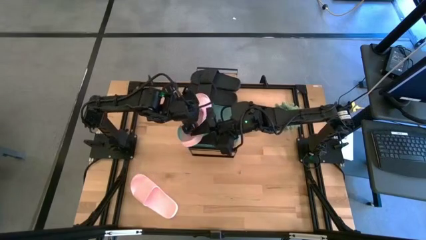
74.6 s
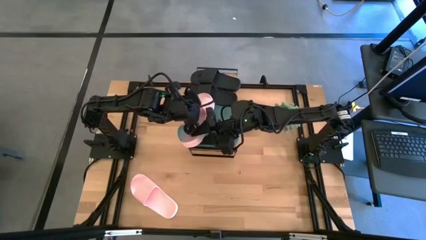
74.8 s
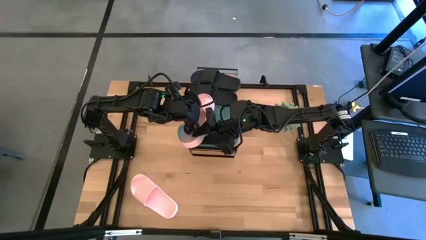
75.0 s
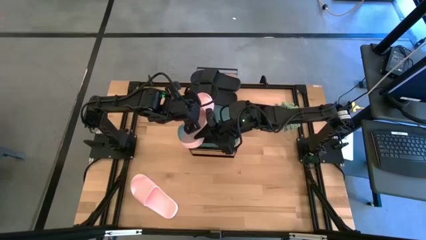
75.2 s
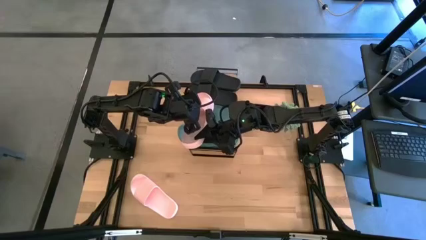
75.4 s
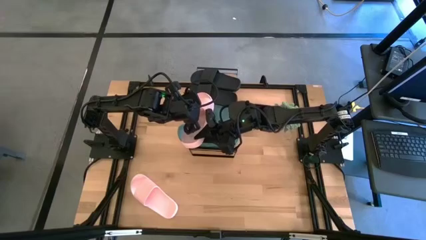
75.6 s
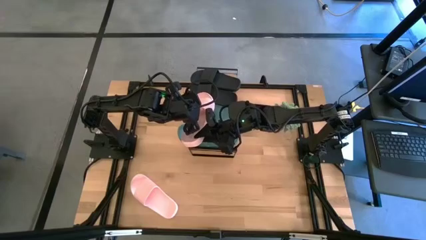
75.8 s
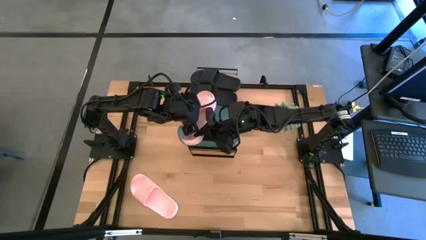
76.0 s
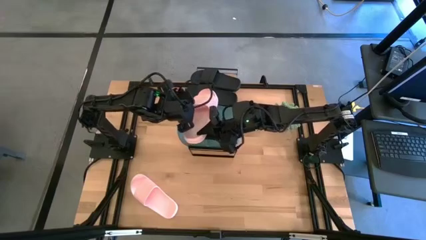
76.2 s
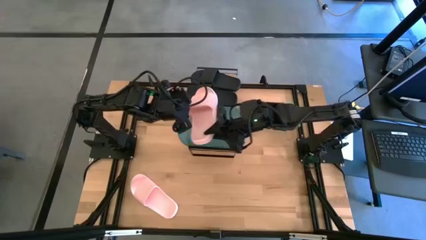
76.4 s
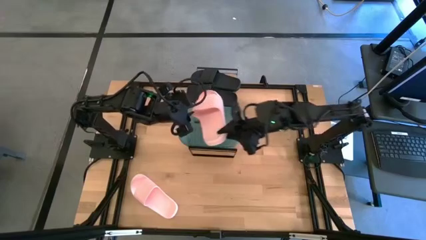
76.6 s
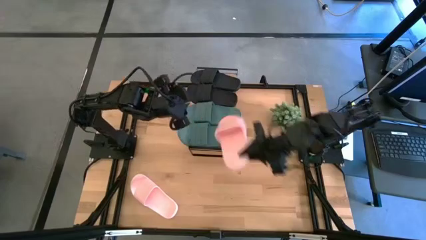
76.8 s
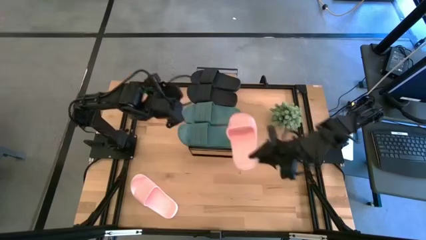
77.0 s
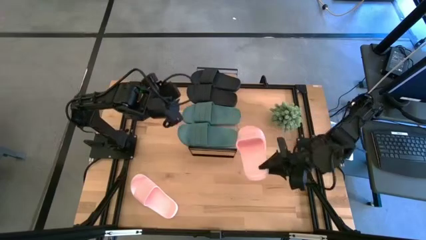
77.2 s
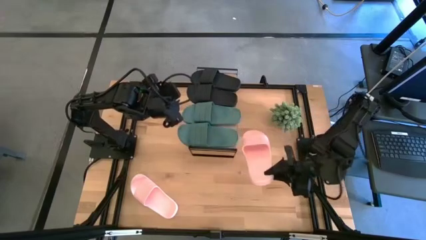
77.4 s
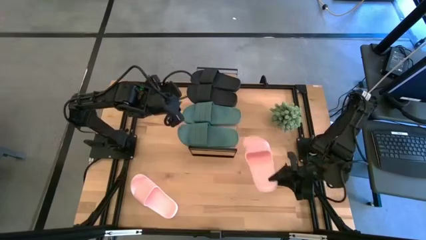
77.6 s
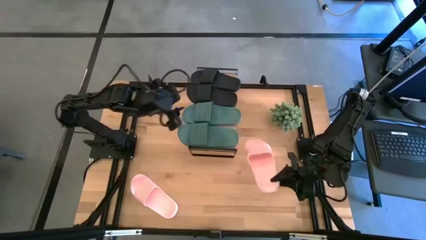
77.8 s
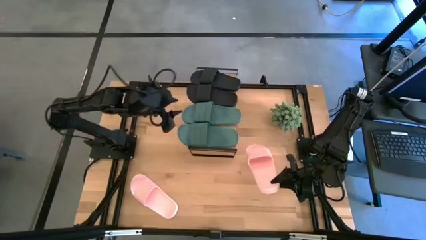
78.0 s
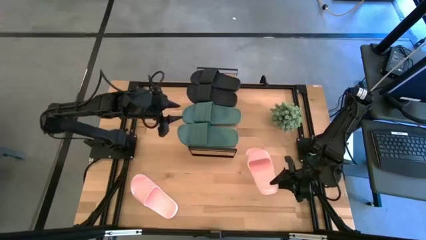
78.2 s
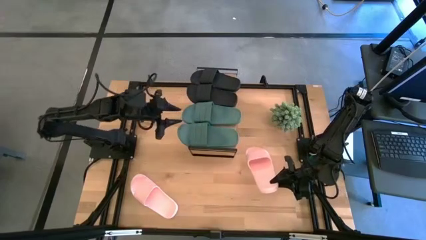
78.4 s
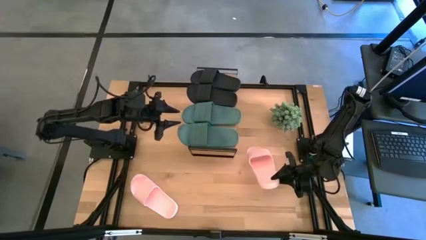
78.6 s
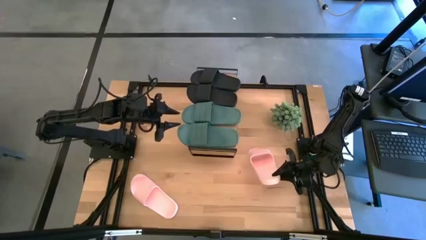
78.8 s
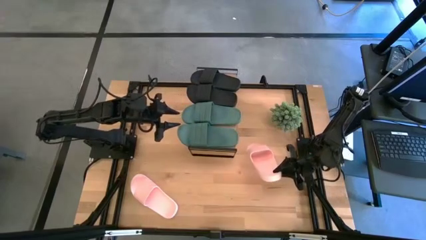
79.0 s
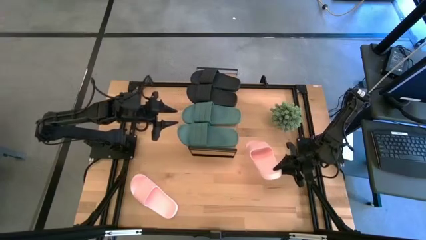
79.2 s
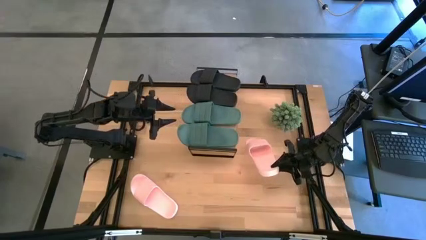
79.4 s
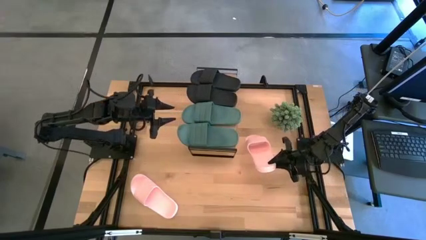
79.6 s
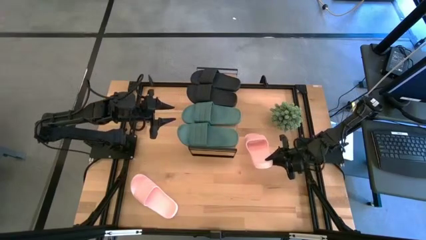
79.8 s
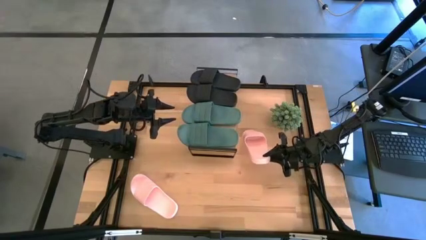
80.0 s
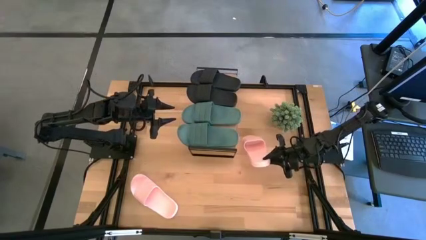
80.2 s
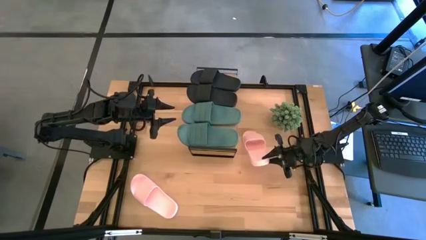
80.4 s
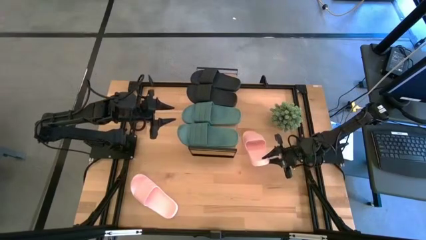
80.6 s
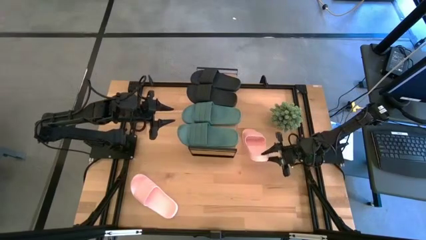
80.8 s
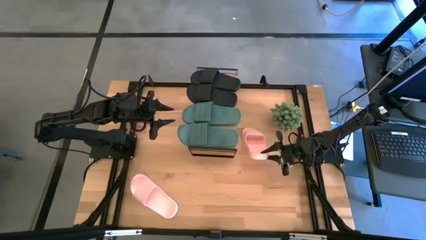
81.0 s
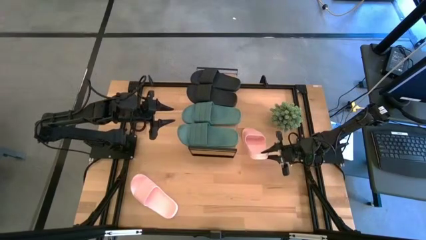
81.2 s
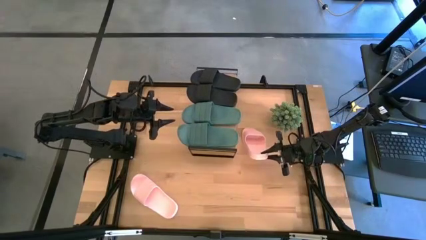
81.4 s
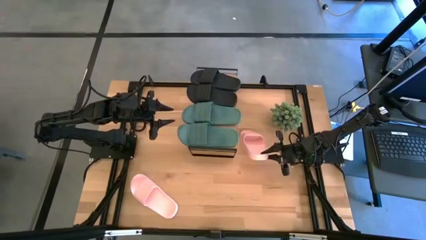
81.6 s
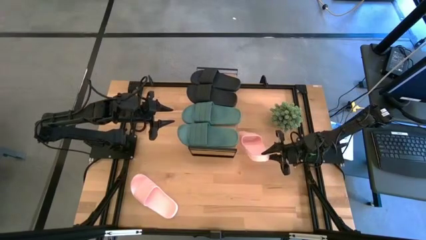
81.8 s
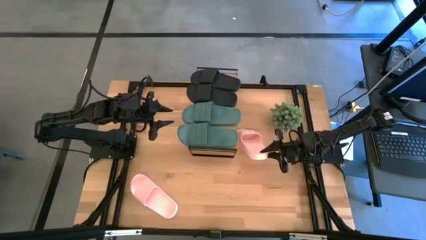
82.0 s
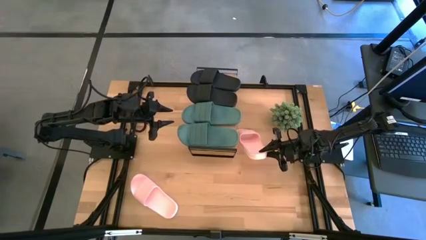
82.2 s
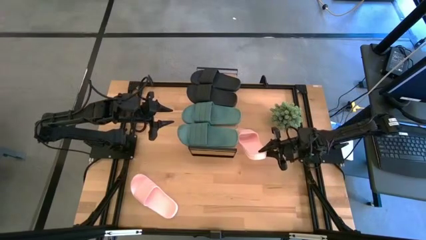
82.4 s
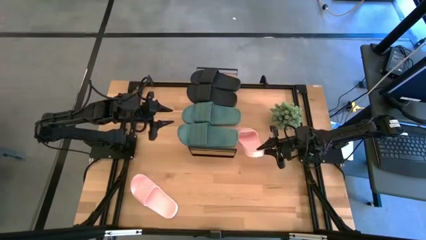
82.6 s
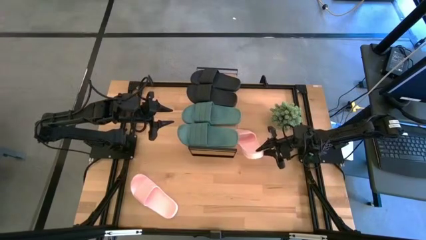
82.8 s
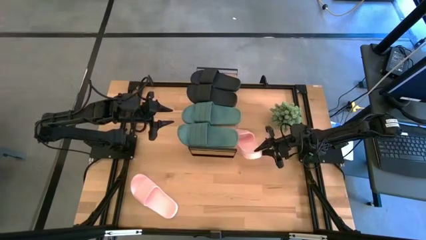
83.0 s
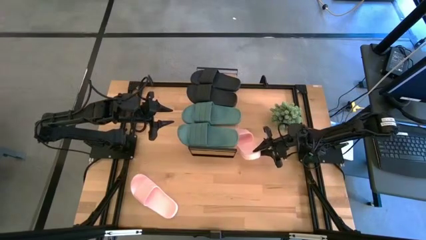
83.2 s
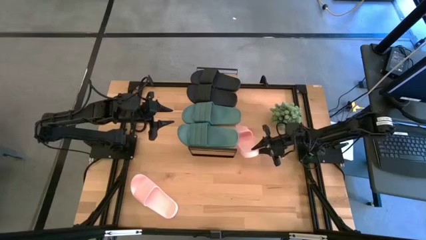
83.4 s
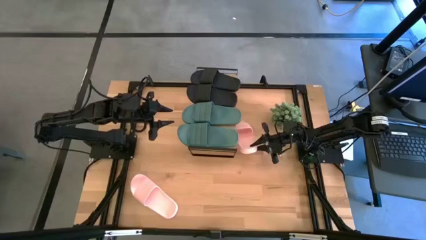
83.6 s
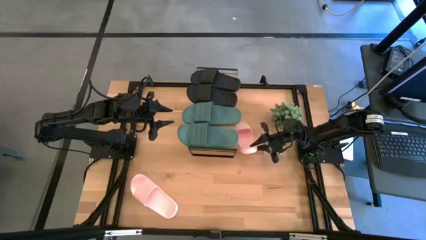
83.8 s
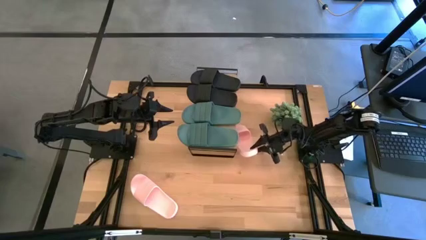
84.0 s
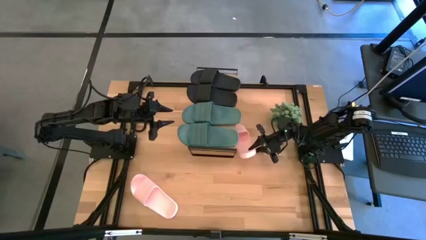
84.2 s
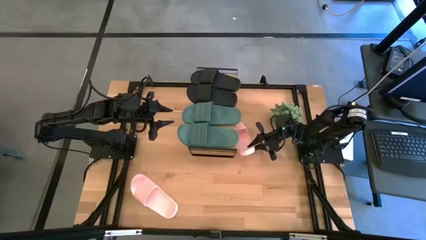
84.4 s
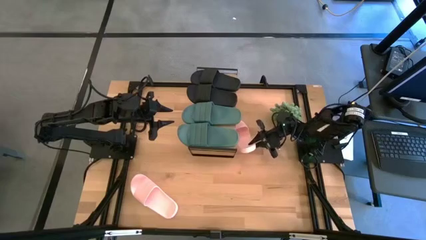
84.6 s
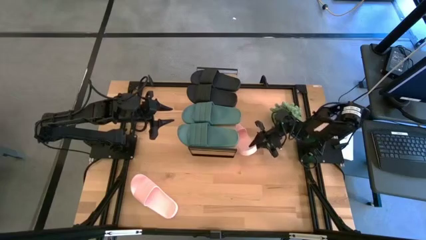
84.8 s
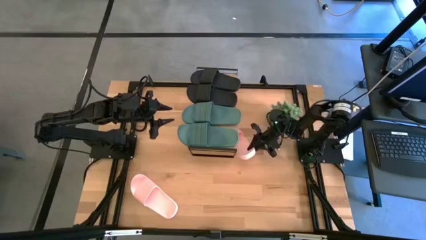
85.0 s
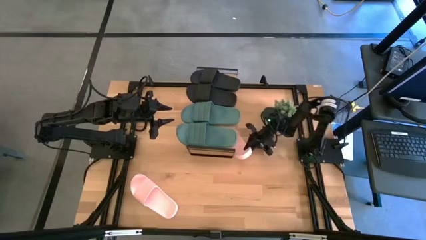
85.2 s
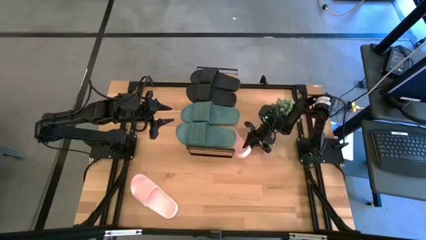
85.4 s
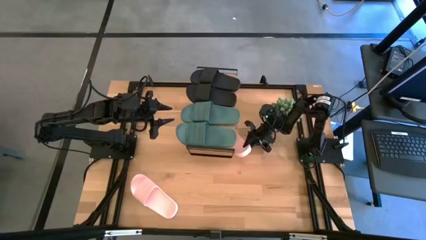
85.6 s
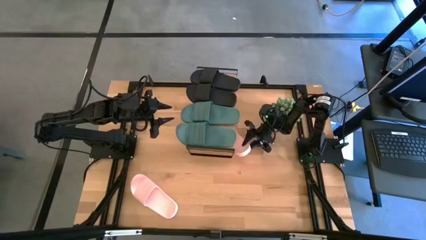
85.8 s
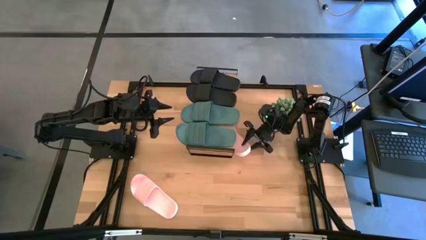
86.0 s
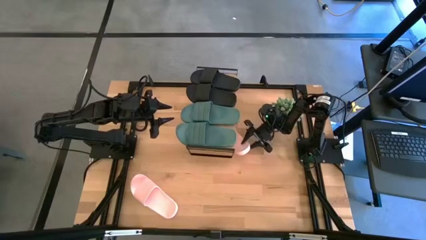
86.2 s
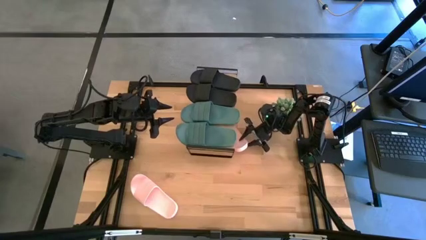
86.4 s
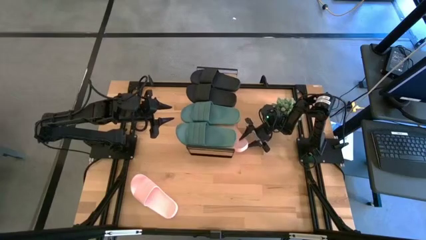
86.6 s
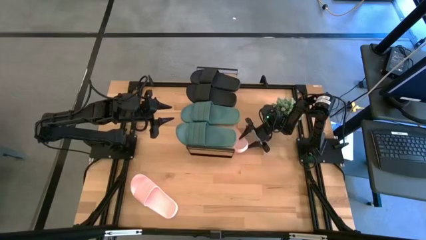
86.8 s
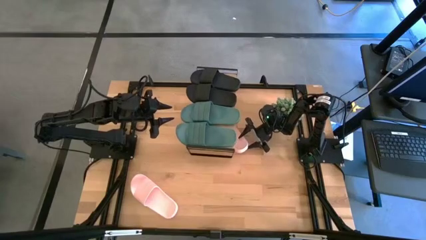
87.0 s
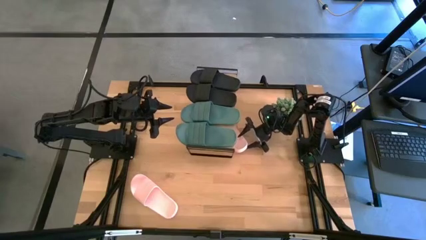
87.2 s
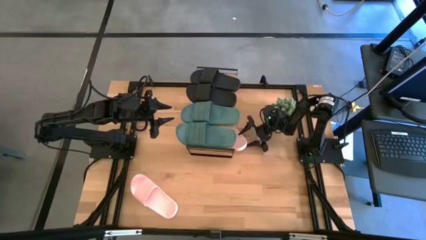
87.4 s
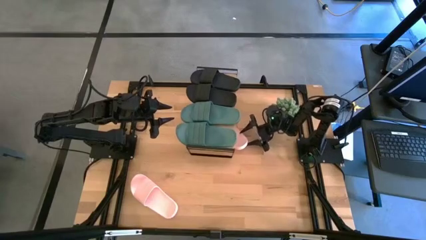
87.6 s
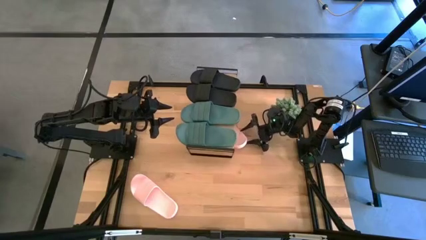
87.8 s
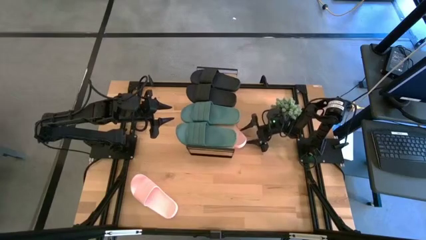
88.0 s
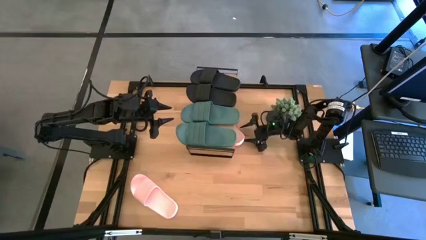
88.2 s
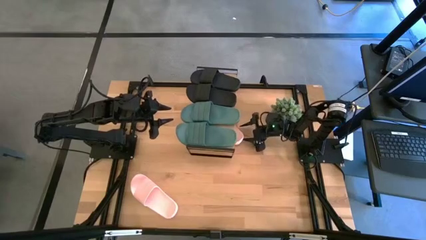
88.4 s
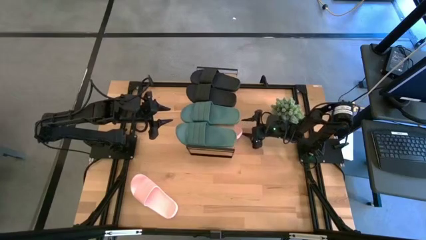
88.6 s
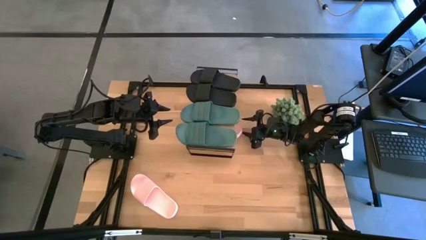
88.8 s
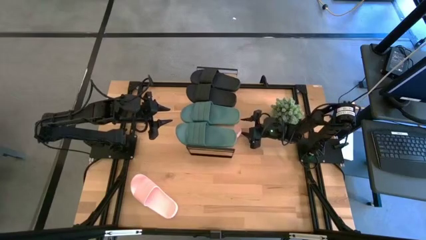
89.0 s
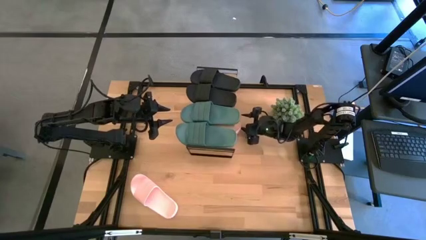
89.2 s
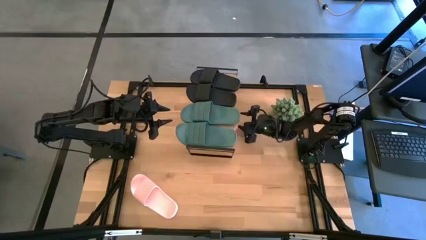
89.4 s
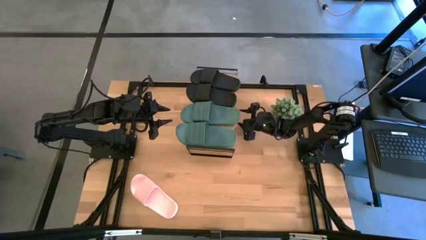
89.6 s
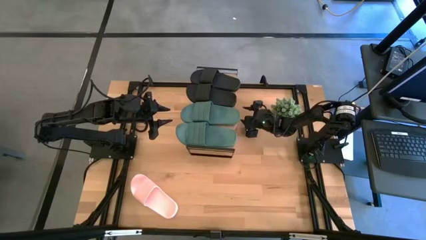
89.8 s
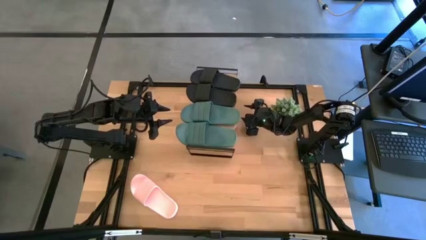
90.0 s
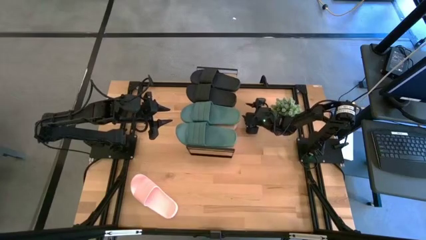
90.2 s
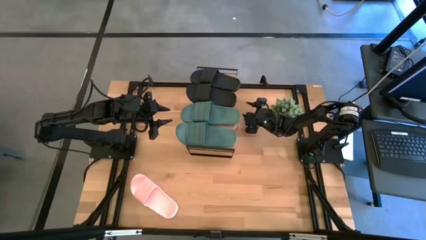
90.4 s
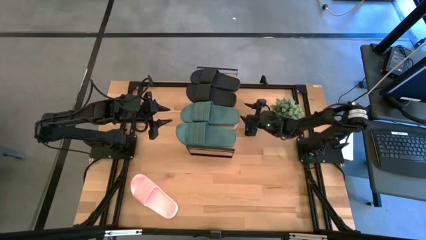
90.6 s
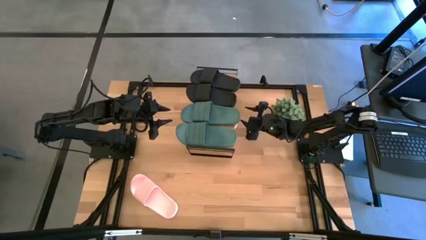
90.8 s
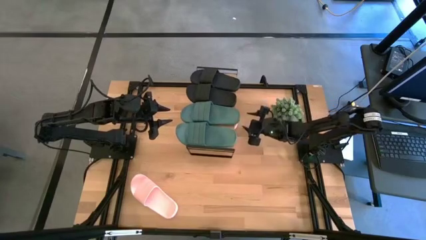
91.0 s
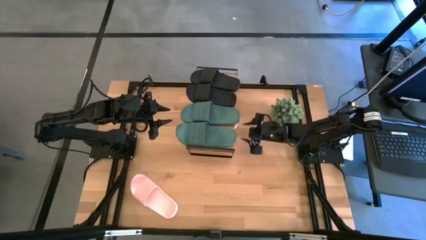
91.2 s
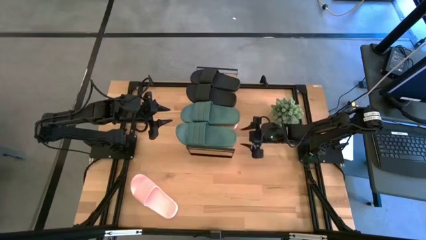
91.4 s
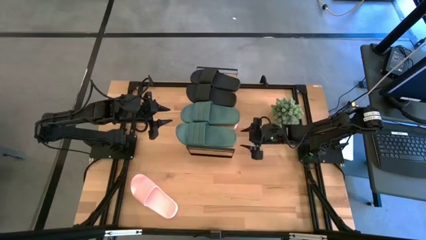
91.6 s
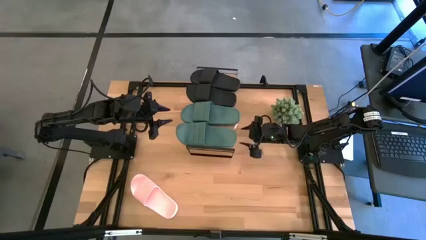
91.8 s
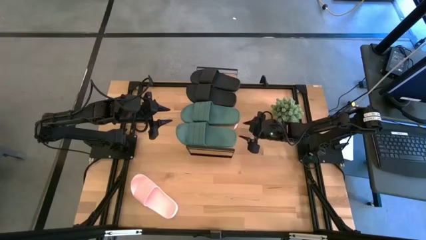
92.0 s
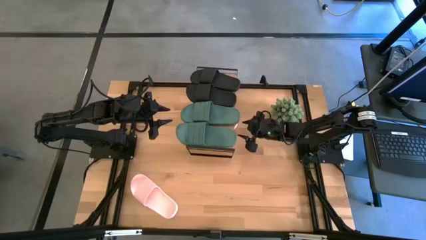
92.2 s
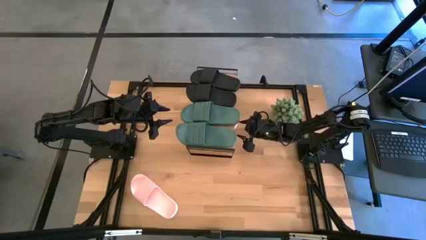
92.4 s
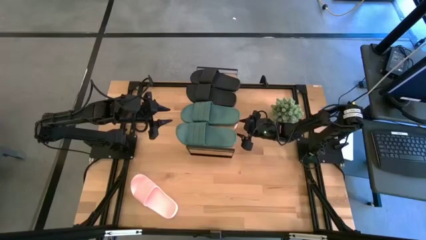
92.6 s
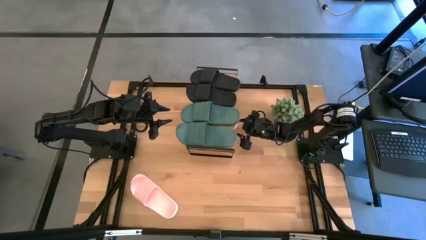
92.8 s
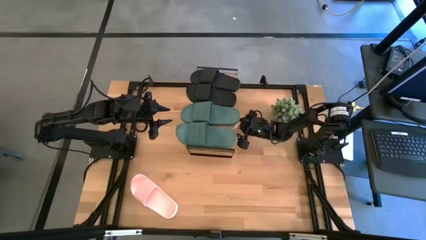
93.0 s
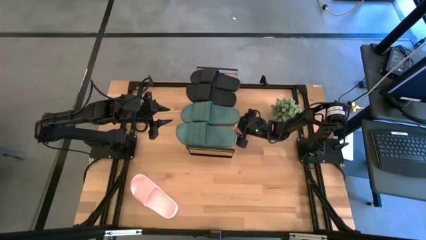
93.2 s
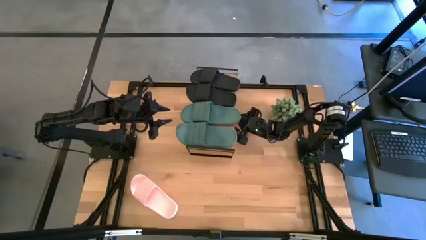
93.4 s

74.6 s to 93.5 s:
Task: Pick and place slides into the shelf
Put the top pink slipper under the shelf
